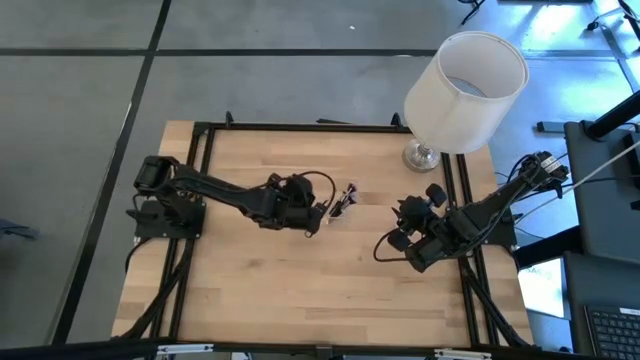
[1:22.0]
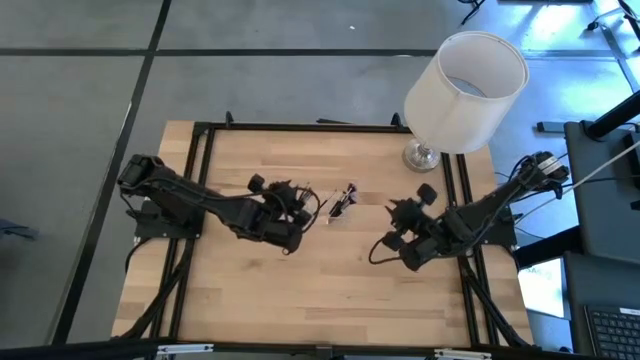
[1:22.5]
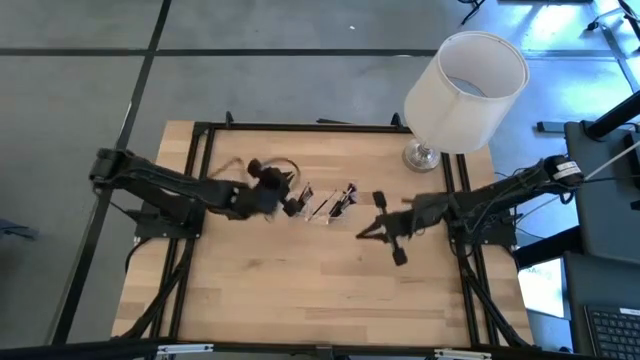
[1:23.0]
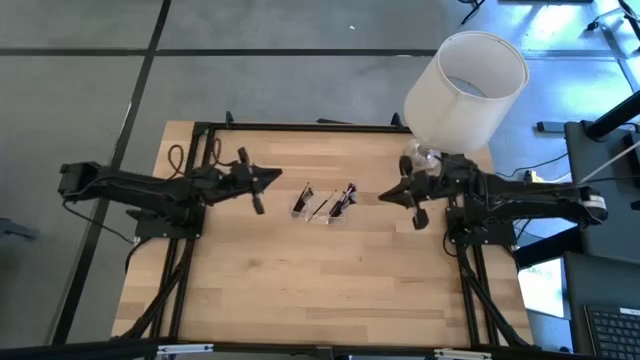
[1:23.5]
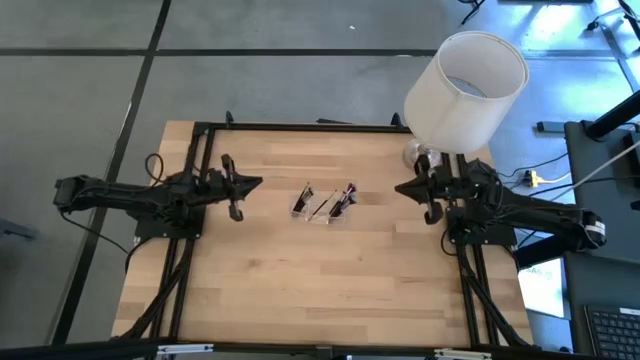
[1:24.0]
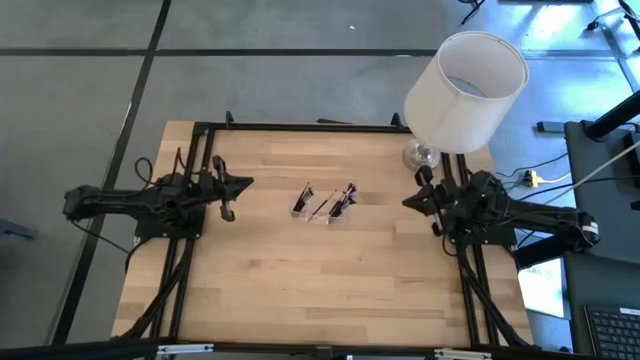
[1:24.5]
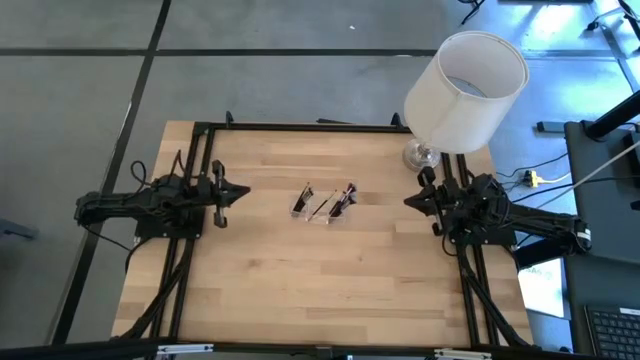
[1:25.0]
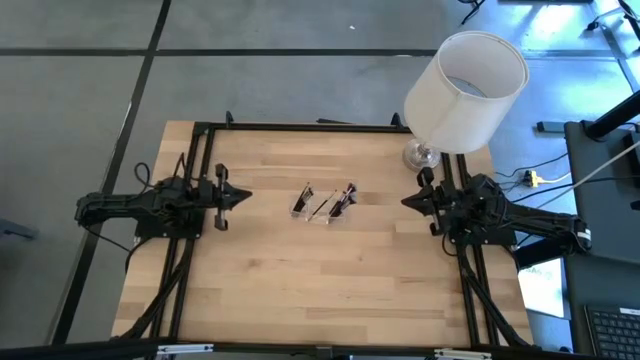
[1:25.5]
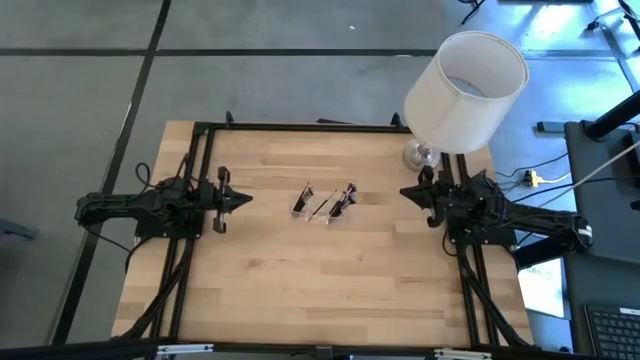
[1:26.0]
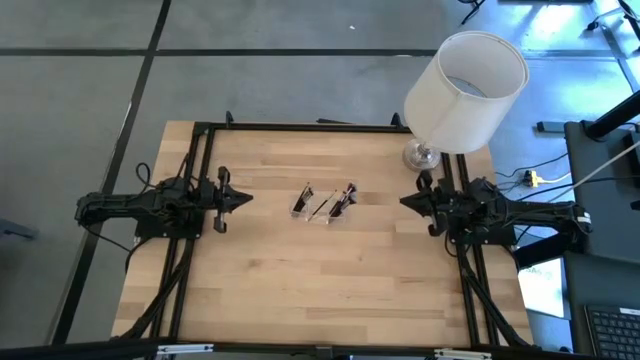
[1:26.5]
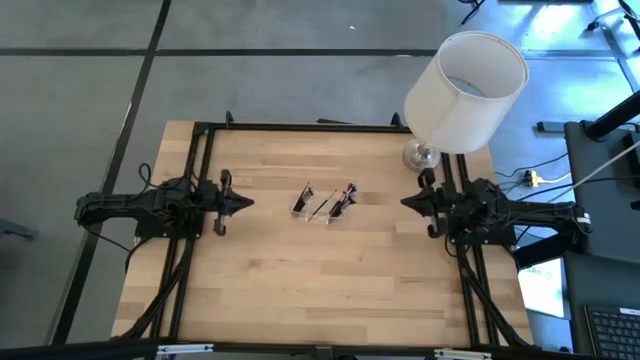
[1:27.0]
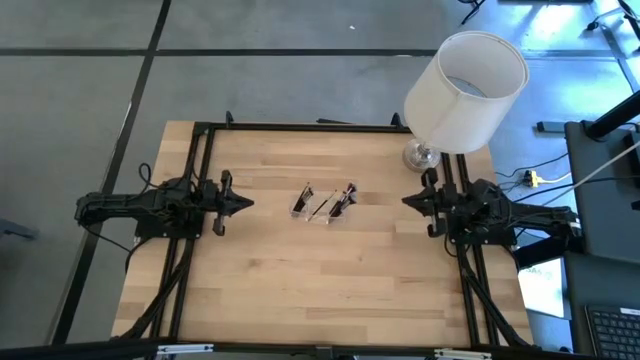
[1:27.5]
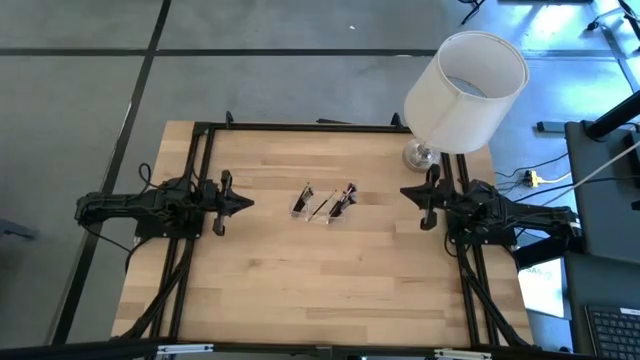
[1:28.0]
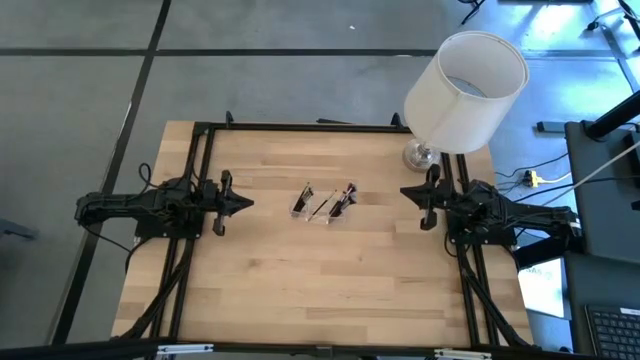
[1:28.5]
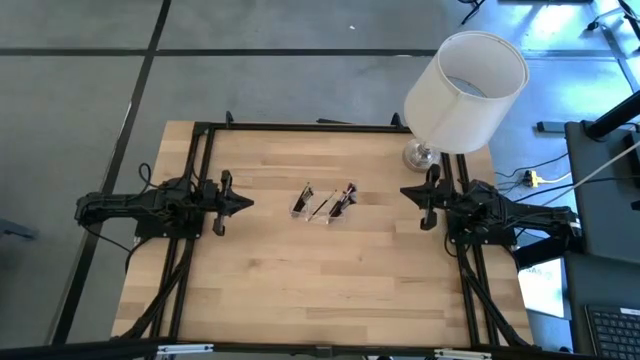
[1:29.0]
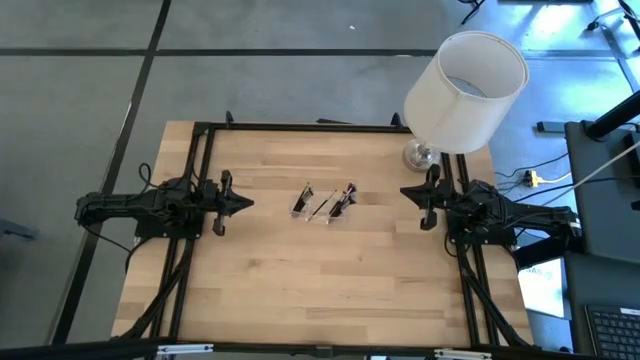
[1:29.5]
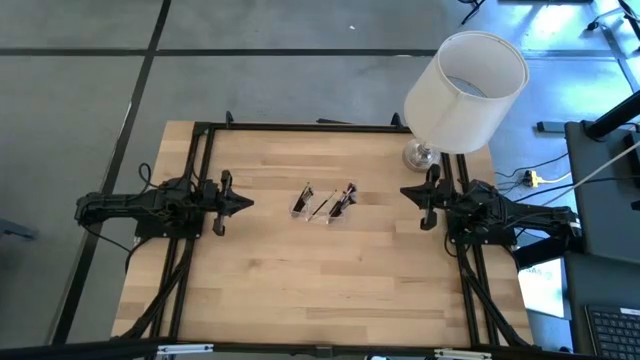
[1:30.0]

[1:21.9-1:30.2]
Task: Put items in baskets/containers
Return to Home Position

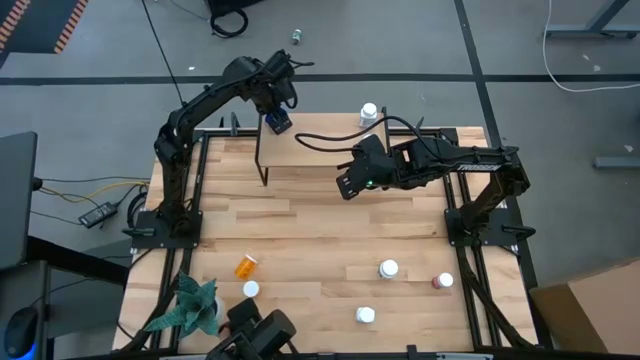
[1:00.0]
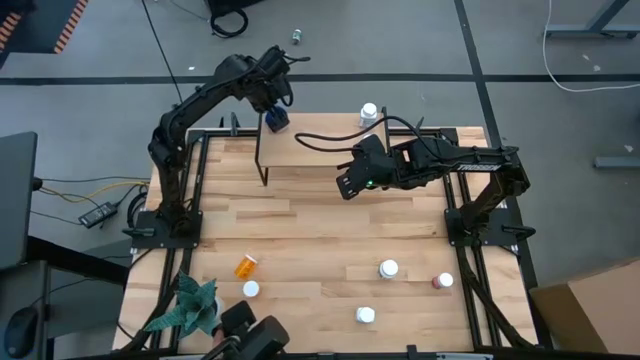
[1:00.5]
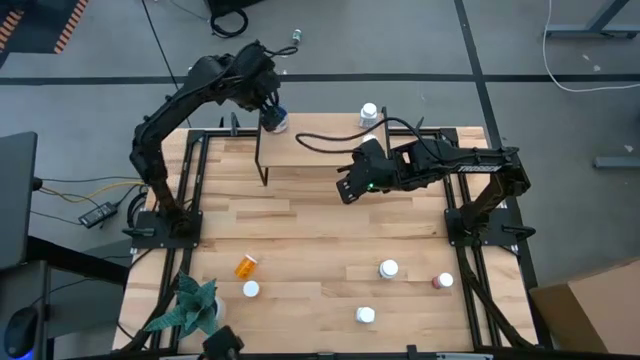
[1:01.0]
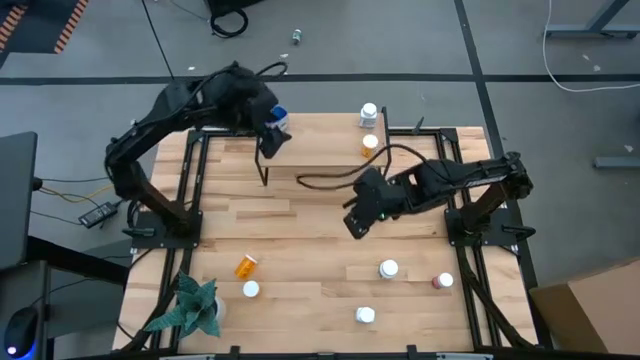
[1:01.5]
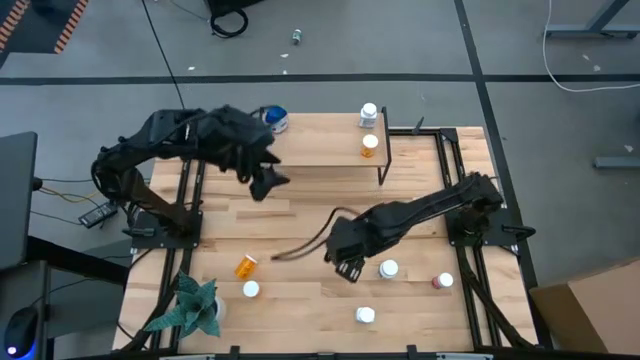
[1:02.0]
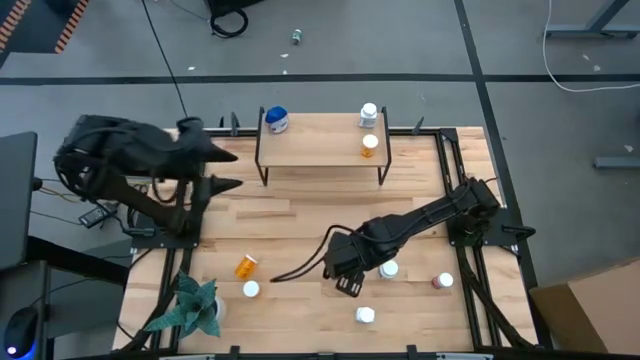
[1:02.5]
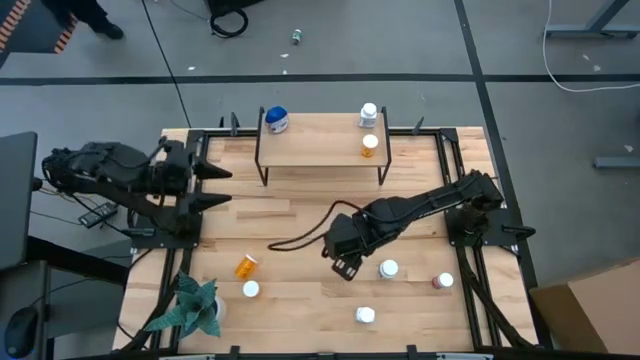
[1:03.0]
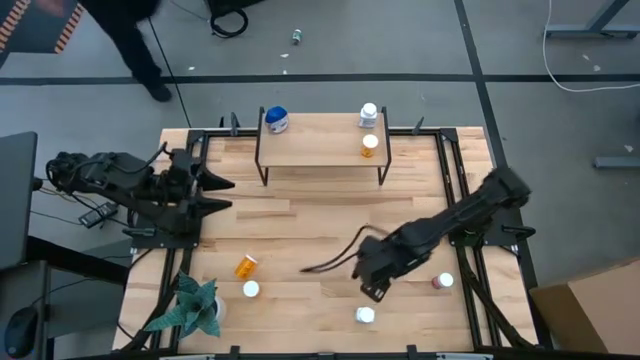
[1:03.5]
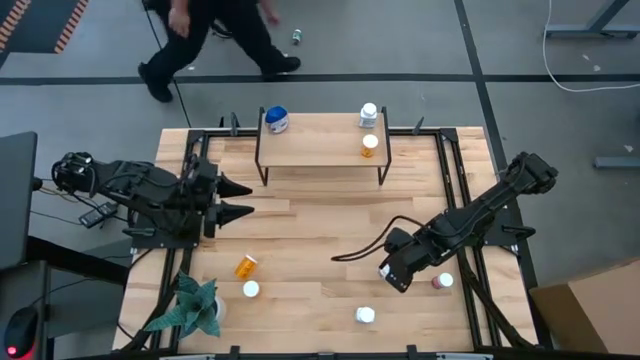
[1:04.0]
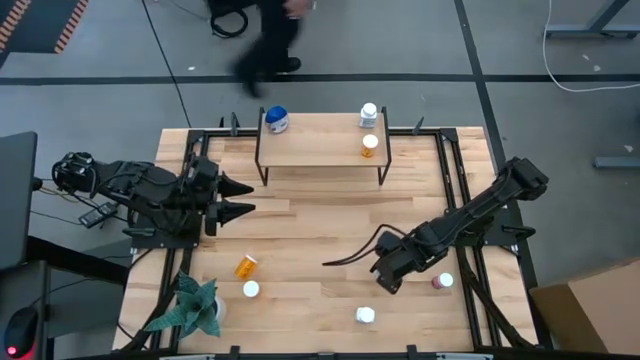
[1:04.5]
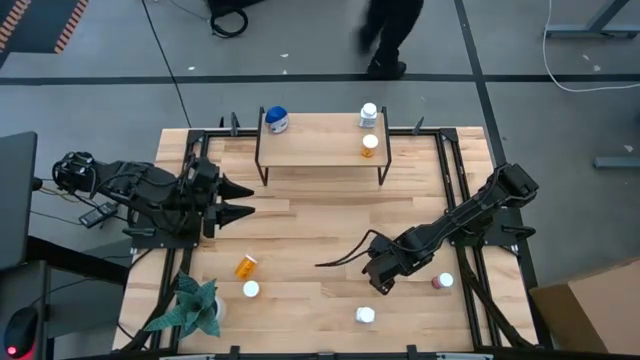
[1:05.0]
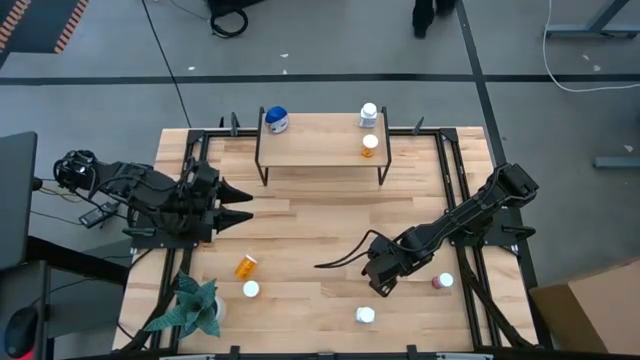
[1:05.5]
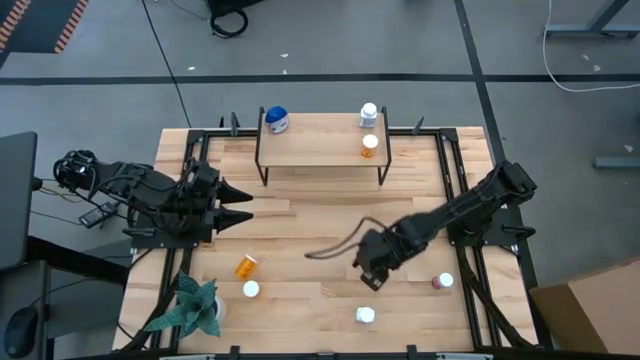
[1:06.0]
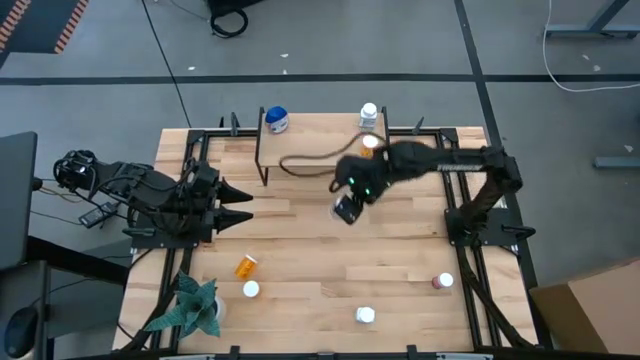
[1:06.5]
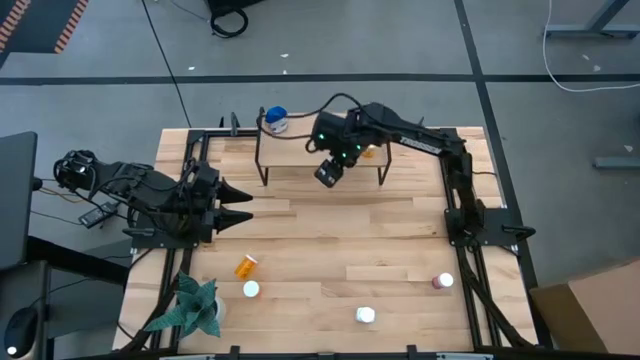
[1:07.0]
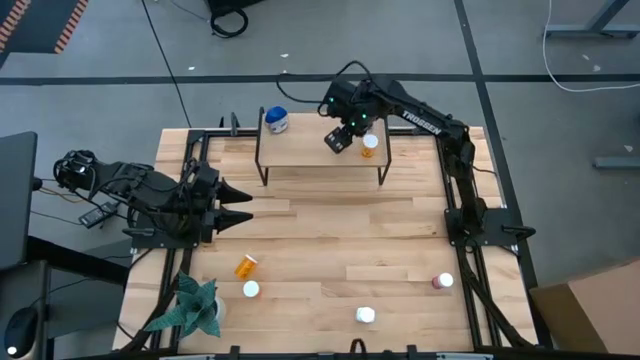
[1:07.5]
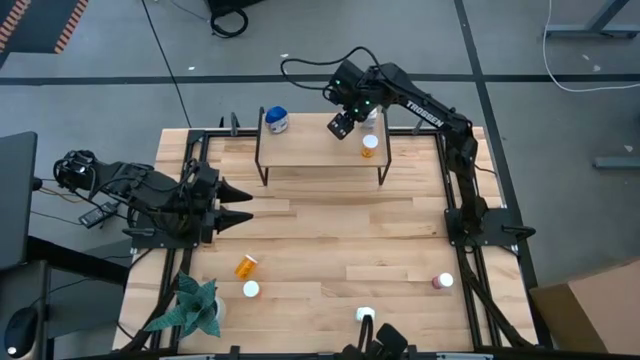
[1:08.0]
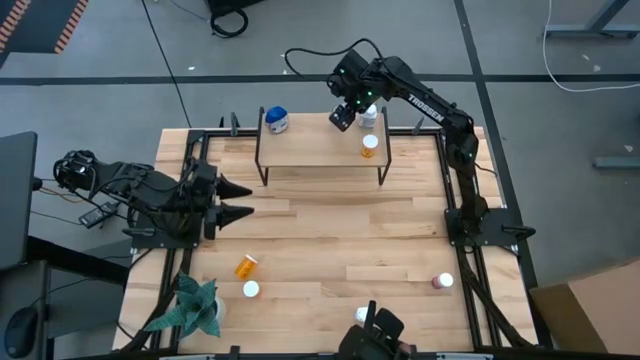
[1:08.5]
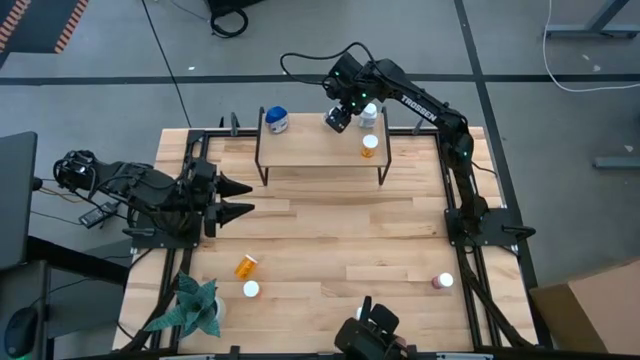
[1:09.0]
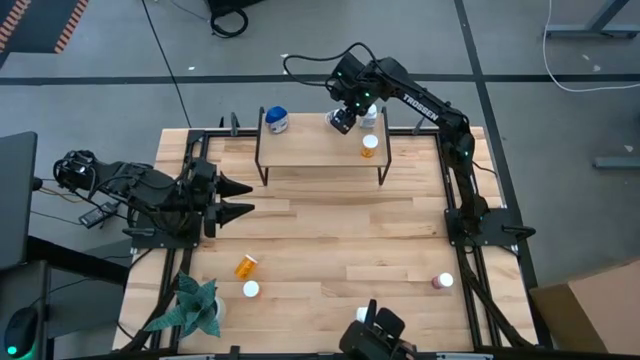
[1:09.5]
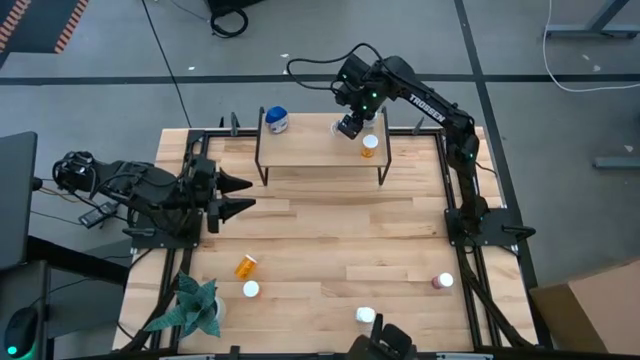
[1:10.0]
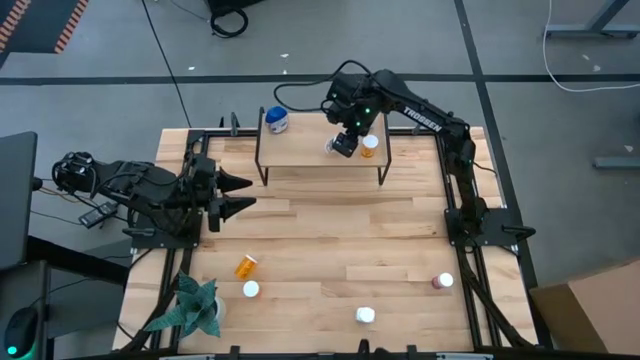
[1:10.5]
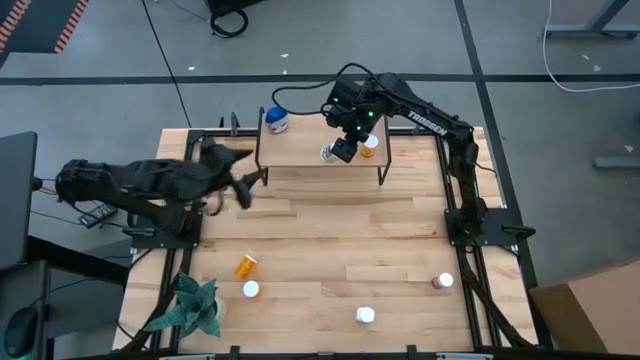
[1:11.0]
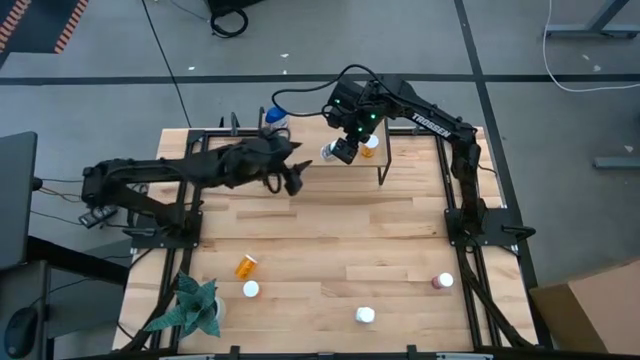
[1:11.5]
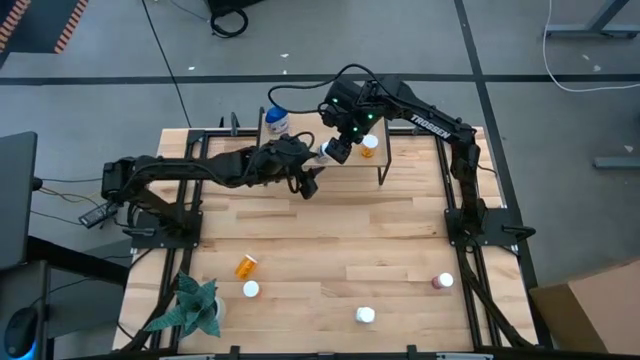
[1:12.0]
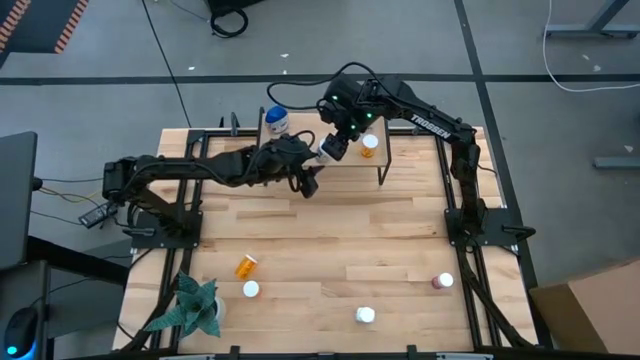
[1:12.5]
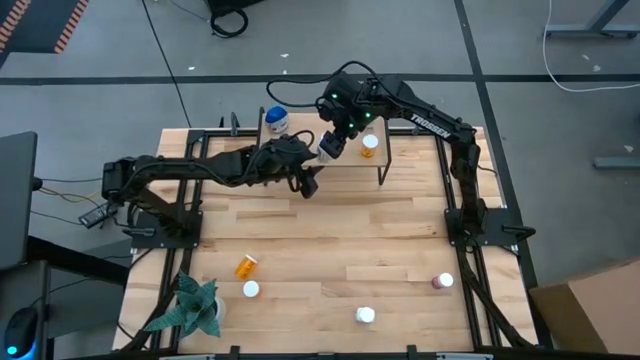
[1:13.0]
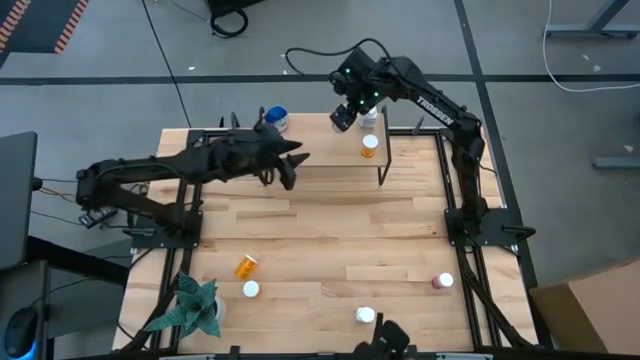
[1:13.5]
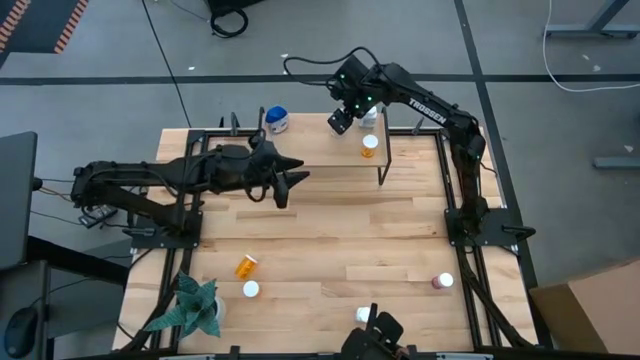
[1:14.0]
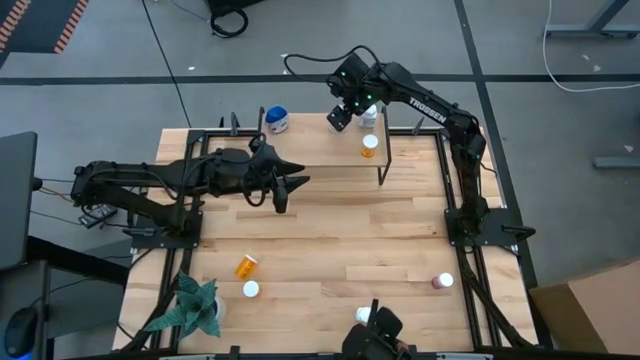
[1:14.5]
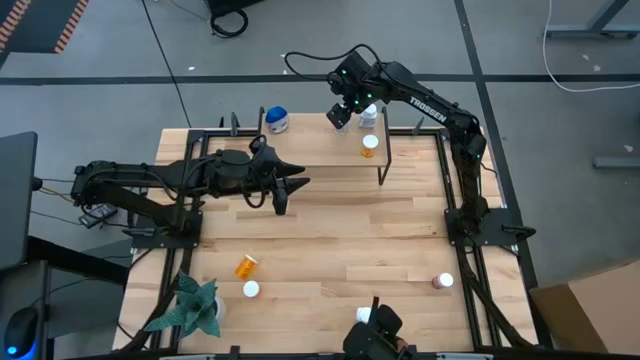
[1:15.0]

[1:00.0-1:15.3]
Task: Pick and place medicine bottles onto shelf by color
Put the top white medicine bottle on the shelf
